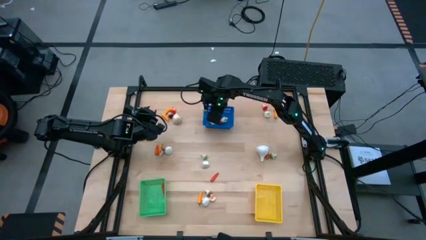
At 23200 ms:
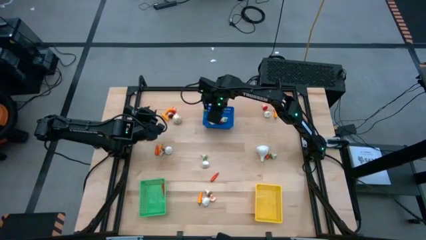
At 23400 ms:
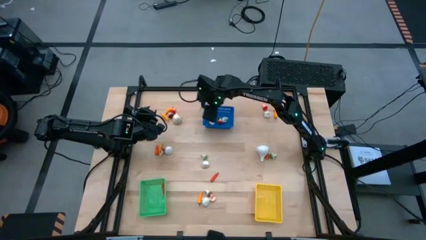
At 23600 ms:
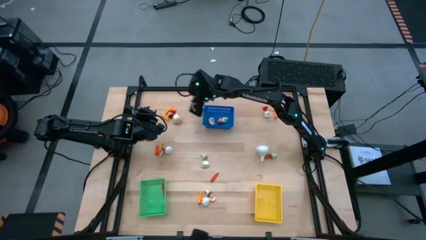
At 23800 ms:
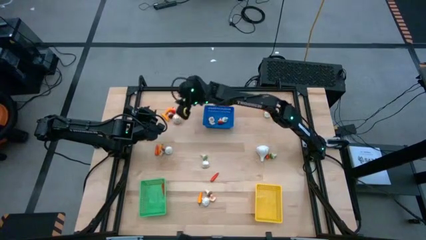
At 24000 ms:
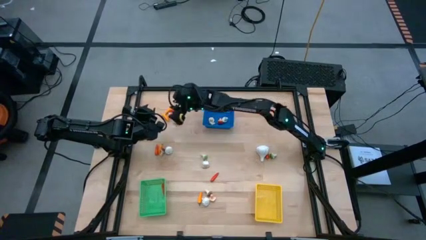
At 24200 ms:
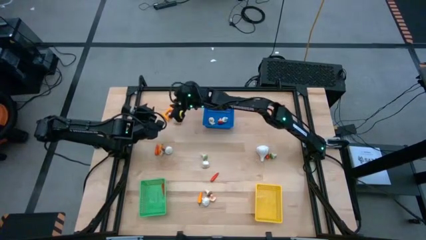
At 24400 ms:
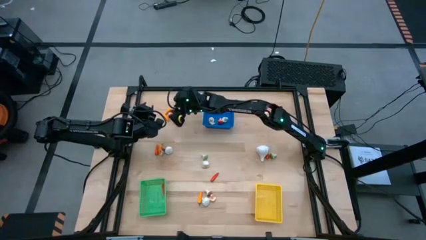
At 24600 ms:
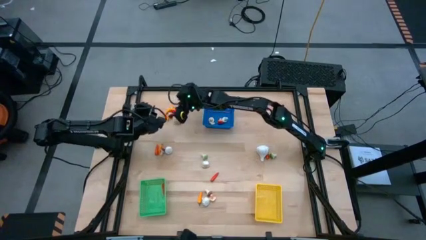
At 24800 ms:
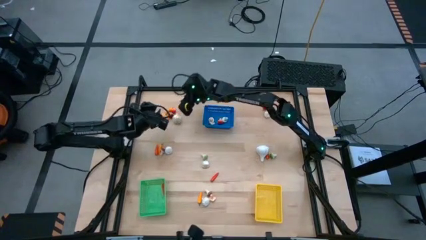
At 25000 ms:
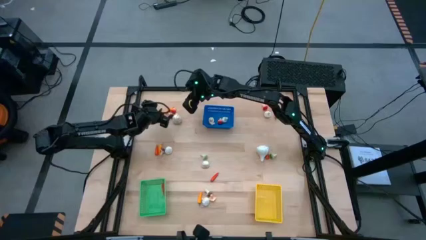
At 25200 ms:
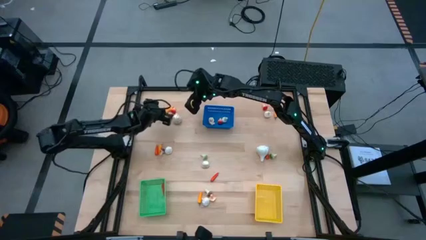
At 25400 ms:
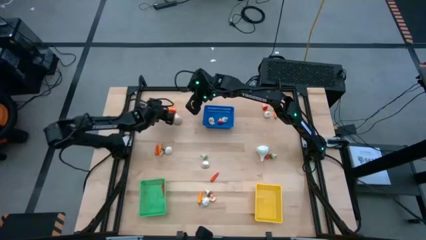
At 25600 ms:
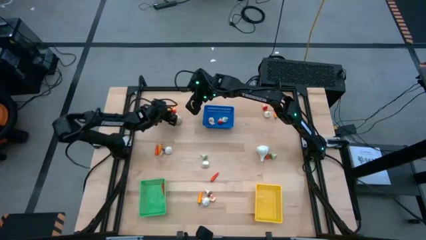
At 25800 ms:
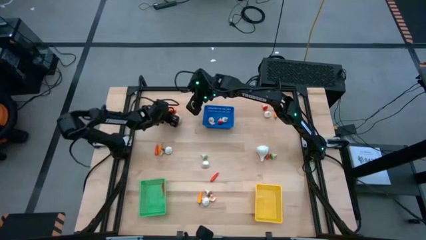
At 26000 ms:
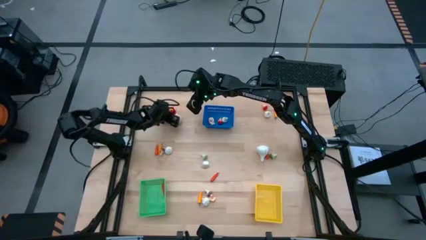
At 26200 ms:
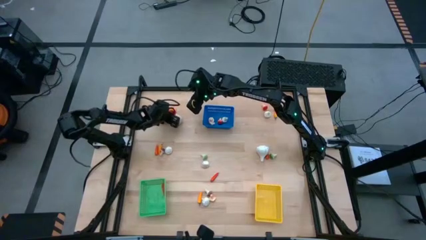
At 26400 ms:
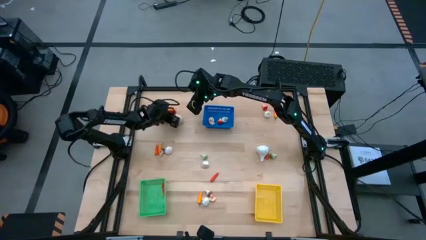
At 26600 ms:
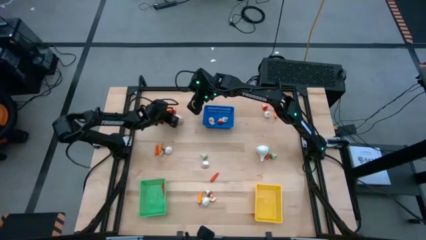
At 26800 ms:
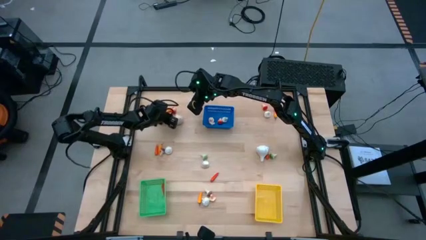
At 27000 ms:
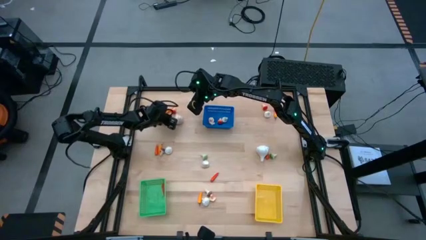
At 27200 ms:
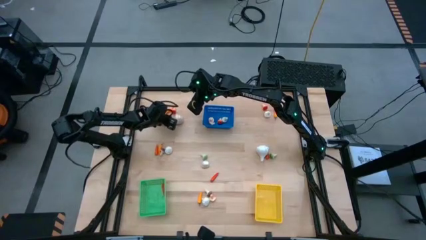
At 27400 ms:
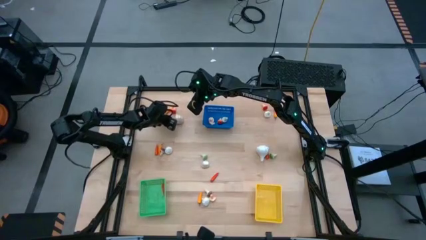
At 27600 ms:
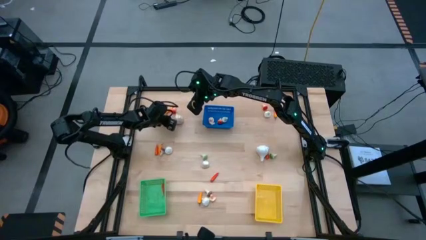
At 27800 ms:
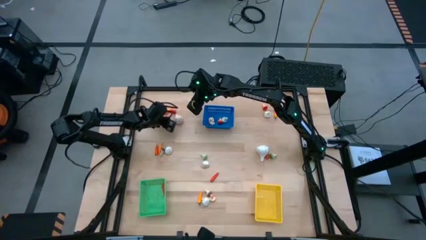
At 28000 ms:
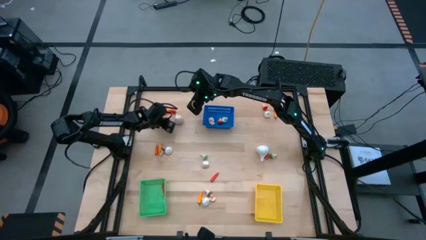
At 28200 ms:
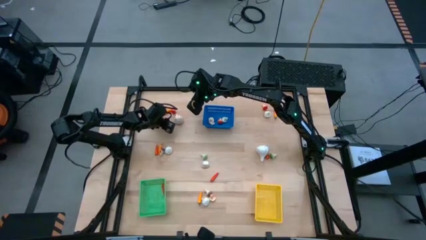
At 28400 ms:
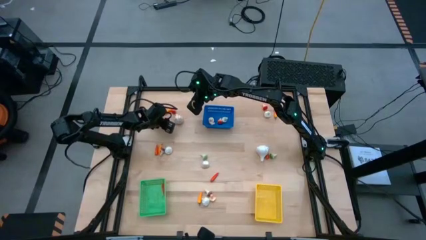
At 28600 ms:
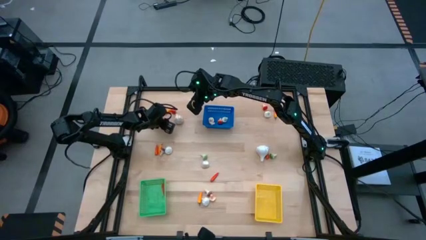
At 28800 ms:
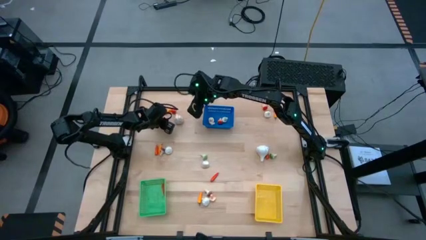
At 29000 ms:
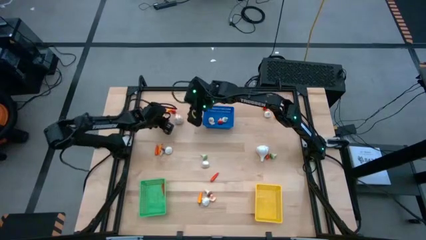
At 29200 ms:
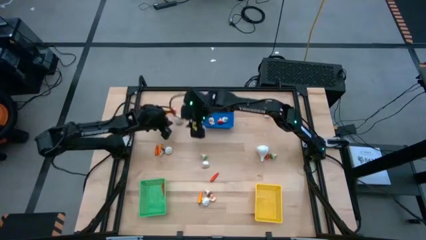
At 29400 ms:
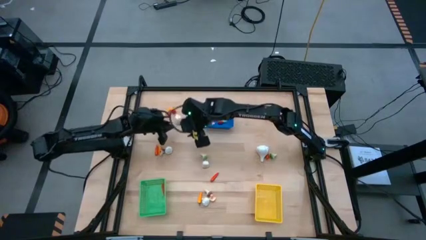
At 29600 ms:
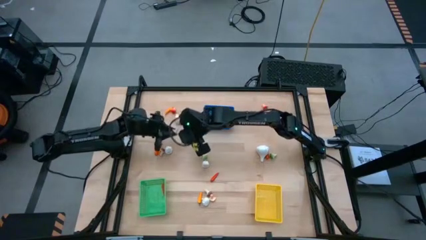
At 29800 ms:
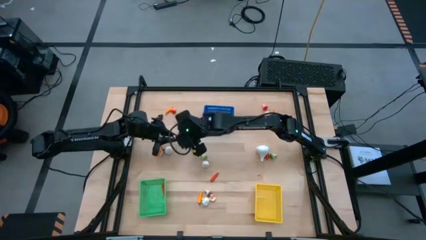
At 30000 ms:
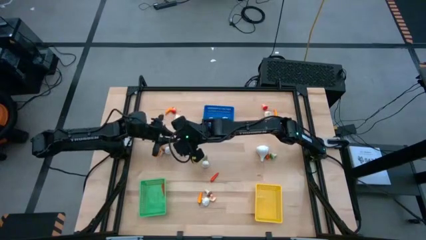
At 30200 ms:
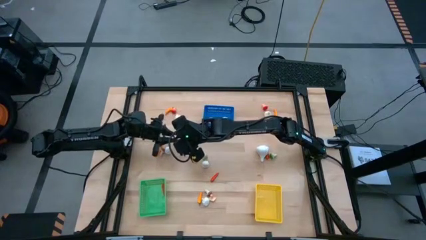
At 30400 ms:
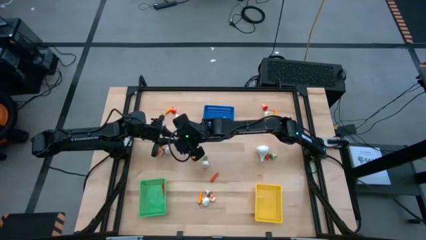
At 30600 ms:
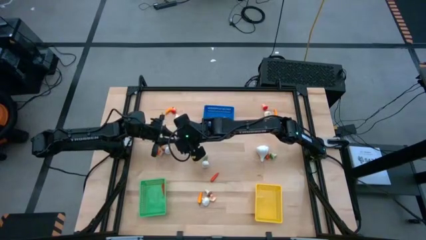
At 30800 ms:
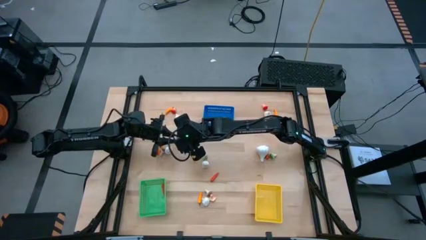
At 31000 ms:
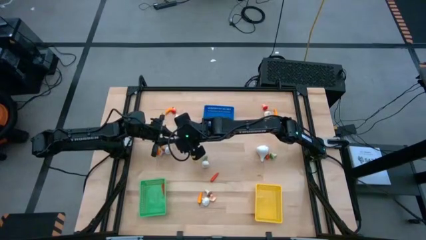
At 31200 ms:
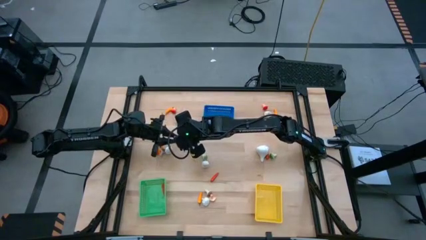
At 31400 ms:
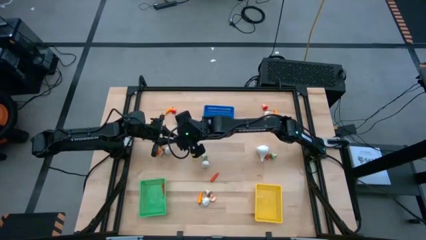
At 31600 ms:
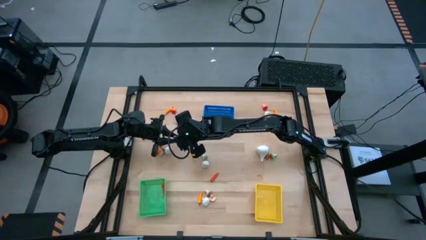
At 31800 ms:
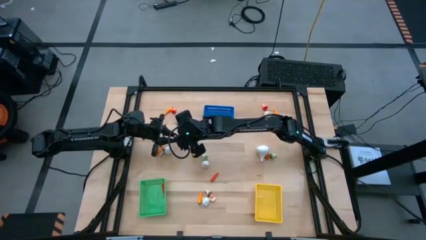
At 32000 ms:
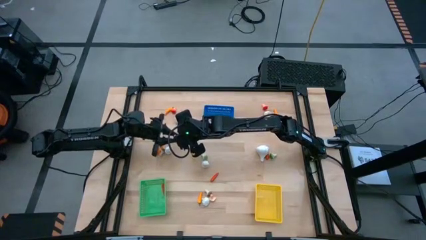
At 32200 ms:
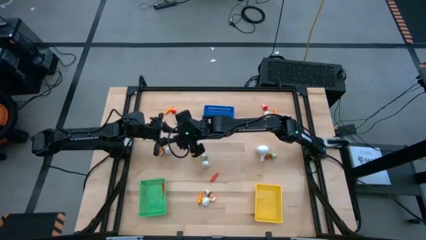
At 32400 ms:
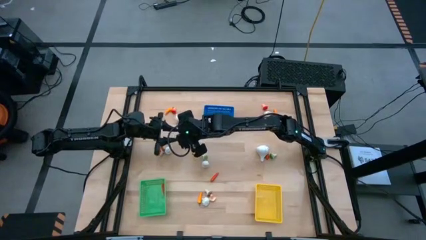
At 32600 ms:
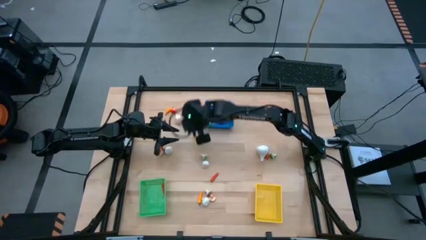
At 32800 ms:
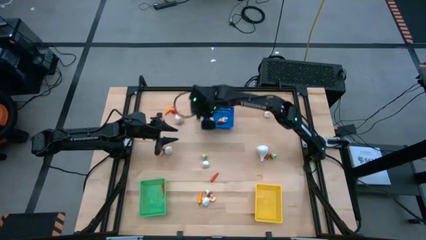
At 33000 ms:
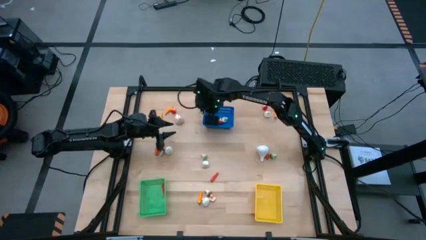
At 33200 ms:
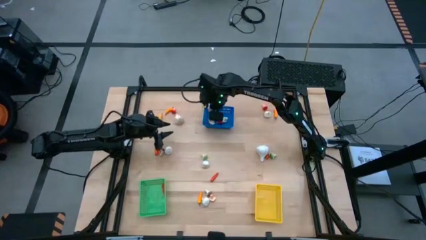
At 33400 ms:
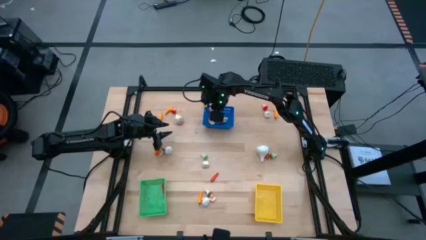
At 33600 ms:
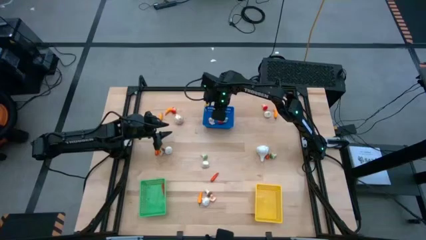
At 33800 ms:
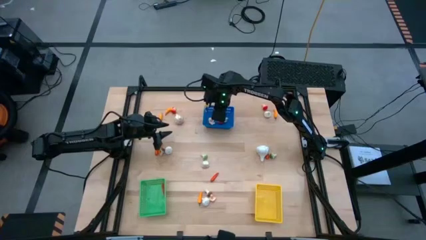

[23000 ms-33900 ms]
Task: Sort produce into baskets
Put the brown mushroom into the blue bin

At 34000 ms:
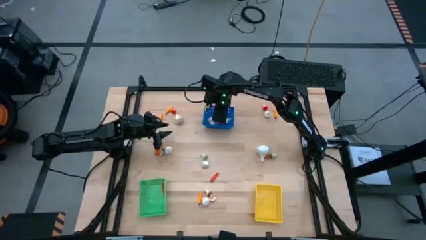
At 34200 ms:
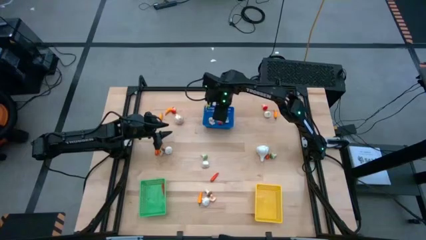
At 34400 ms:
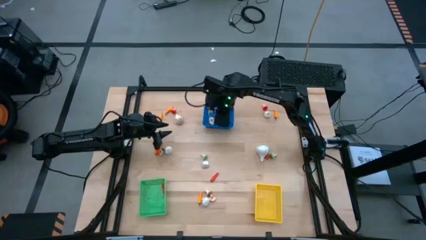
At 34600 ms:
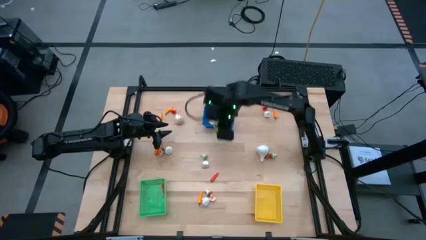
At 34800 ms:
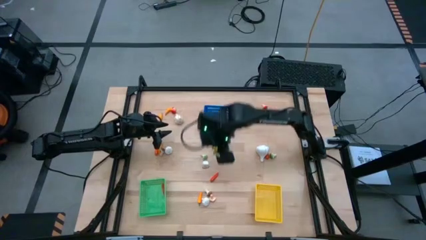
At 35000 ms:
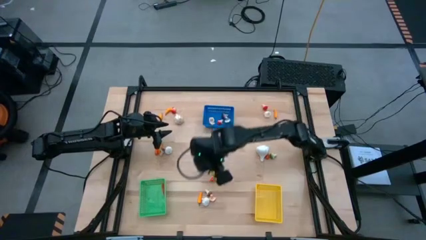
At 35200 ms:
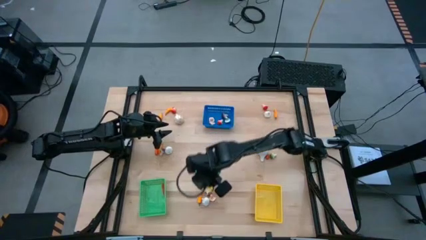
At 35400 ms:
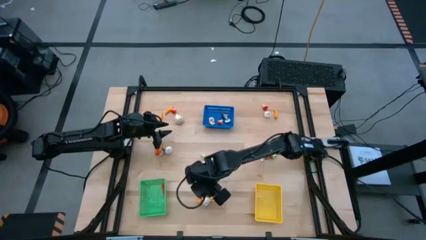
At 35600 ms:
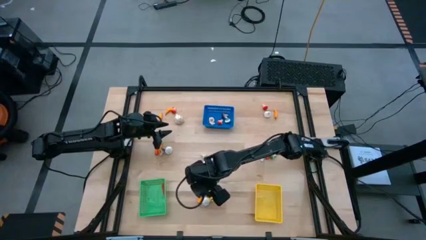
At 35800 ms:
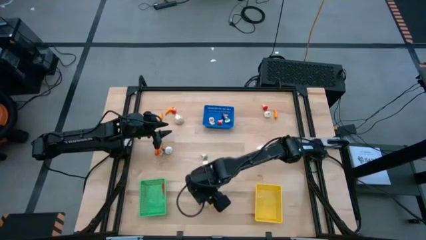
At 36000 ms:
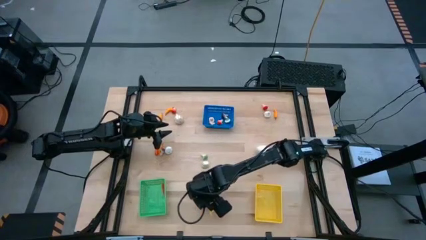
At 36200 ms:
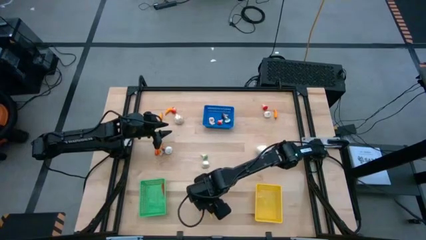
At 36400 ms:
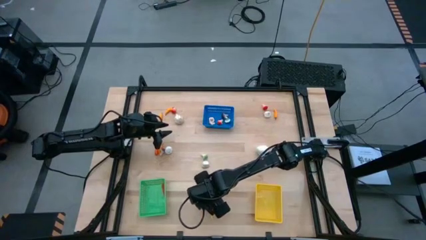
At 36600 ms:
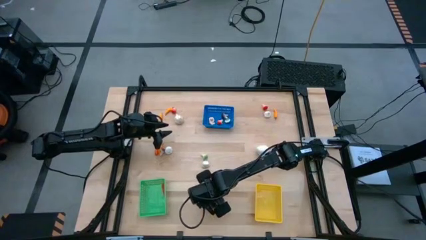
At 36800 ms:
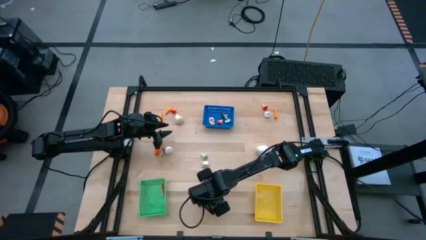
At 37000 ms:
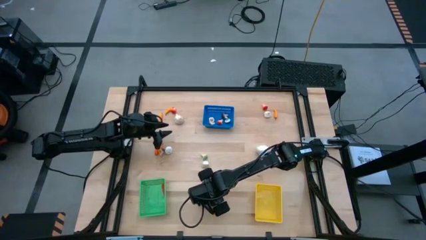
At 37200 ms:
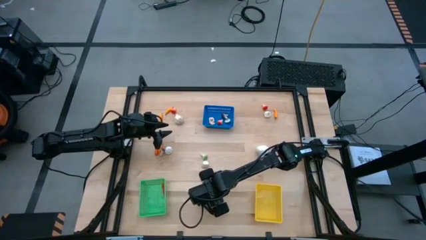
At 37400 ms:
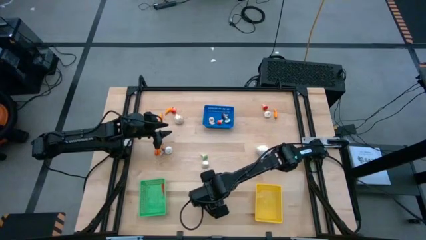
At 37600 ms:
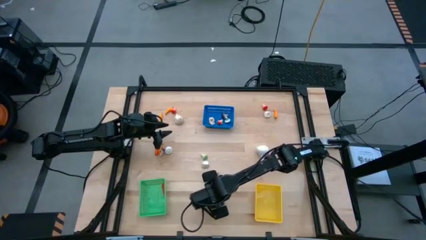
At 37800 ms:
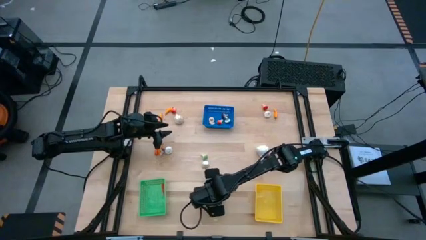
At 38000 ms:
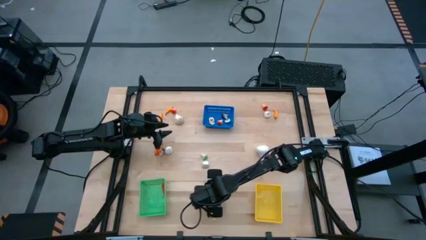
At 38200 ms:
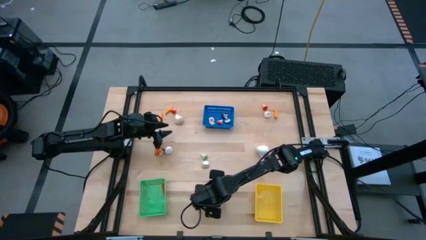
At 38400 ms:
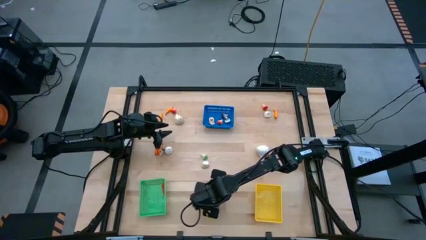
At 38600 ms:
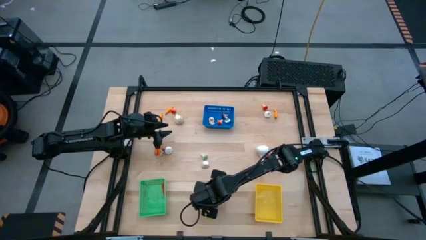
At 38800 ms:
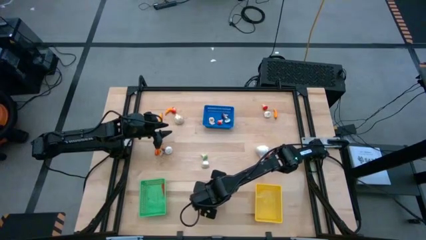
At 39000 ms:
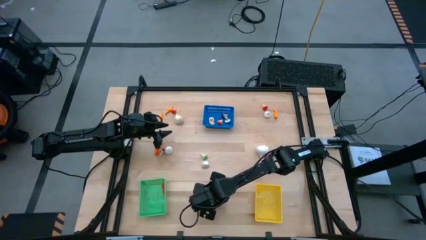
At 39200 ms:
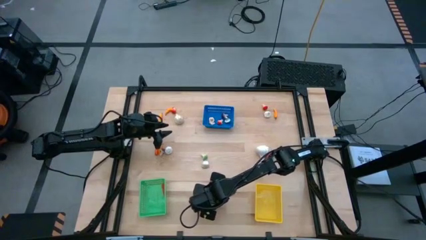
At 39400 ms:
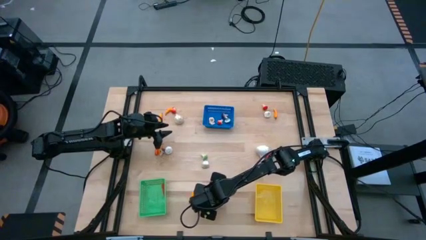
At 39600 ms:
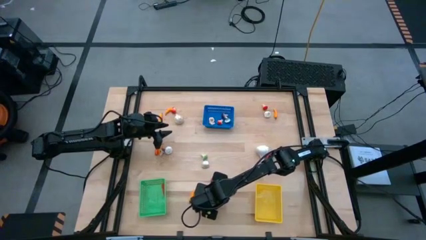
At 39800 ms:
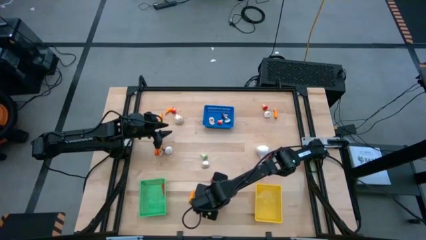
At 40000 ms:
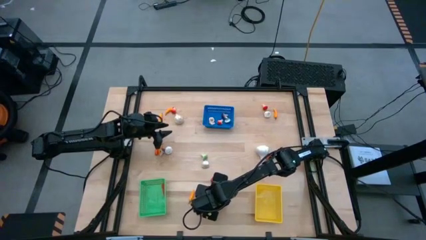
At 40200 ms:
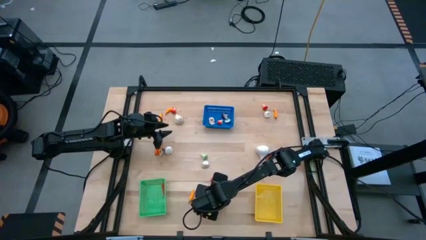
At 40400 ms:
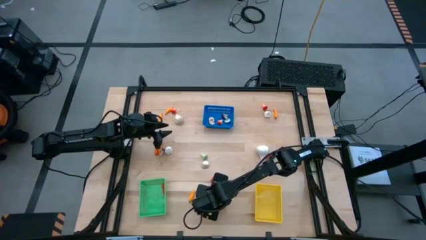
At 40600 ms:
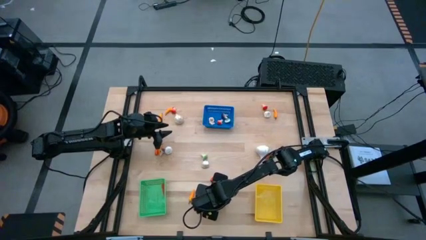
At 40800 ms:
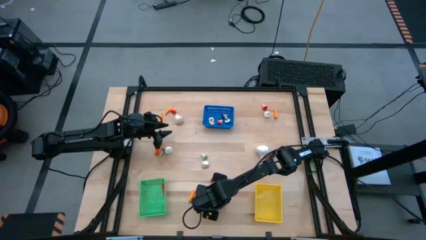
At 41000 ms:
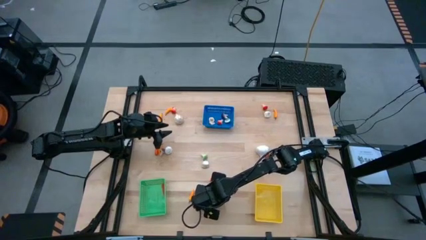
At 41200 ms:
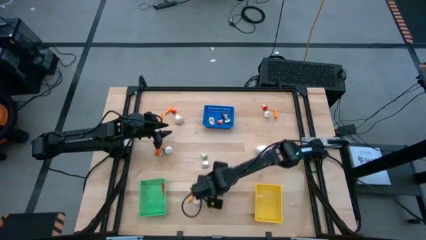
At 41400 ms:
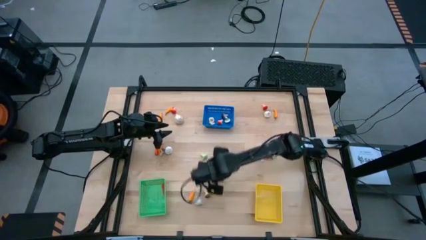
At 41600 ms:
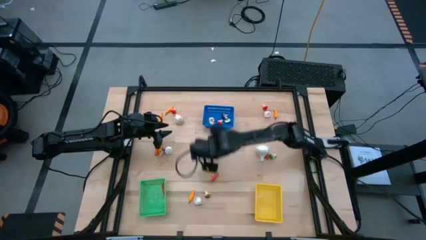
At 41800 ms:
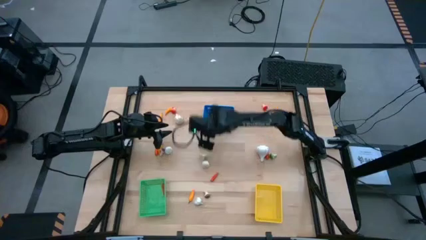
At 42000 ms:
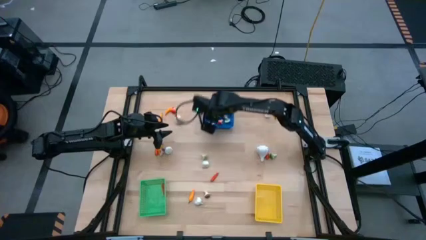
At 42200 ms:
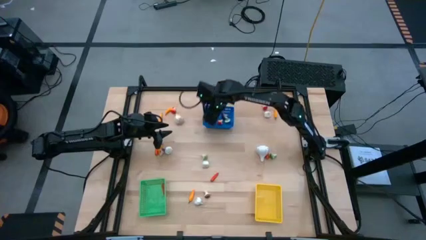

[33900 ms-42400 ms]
Put the red mushroom into the blue bin
